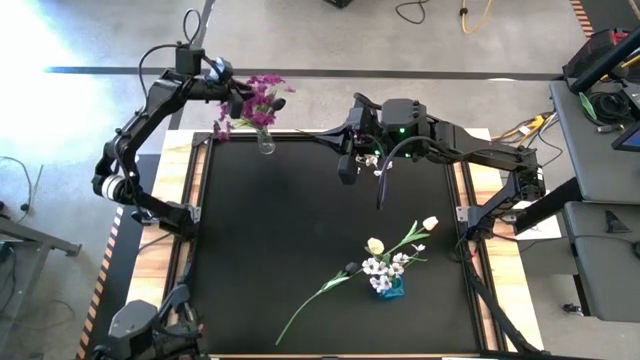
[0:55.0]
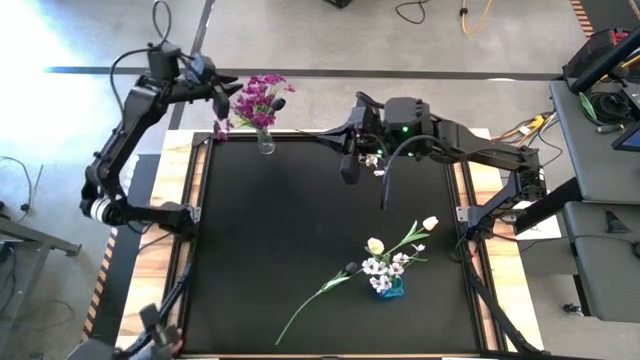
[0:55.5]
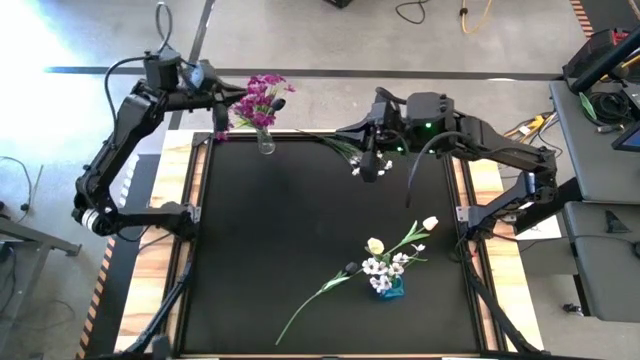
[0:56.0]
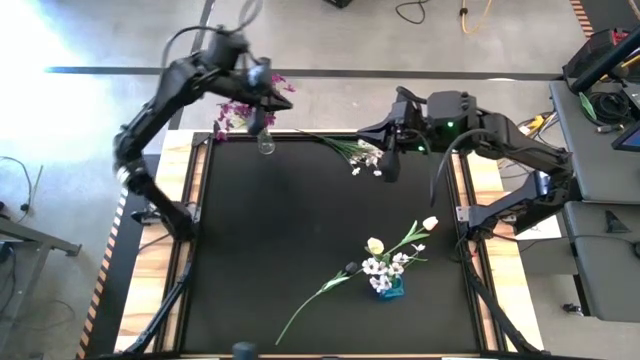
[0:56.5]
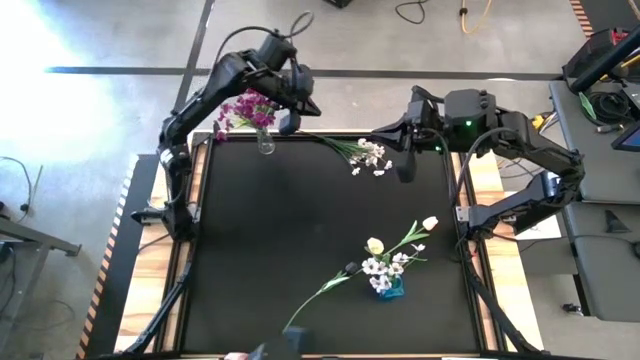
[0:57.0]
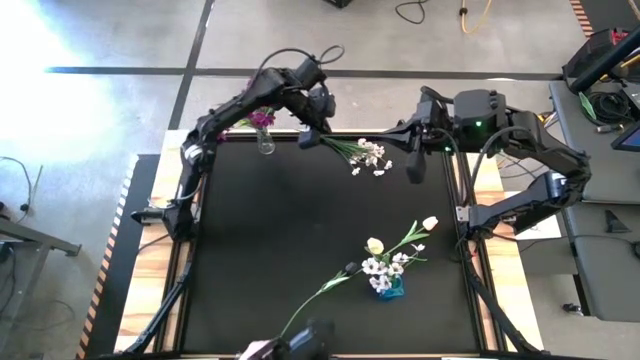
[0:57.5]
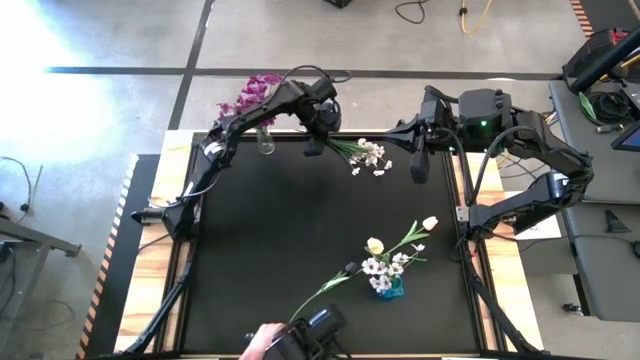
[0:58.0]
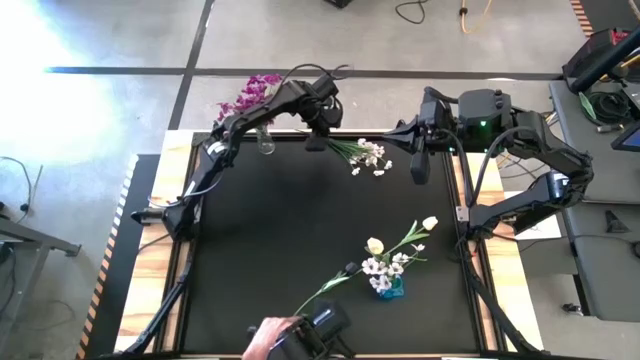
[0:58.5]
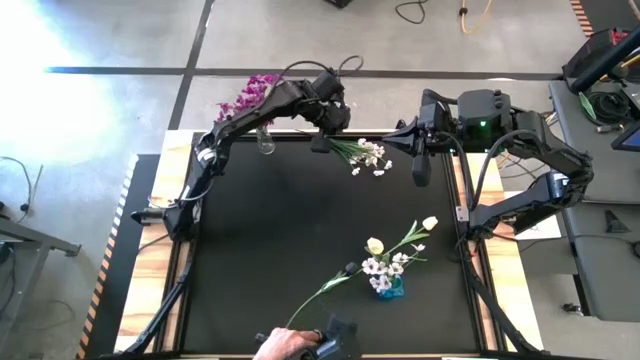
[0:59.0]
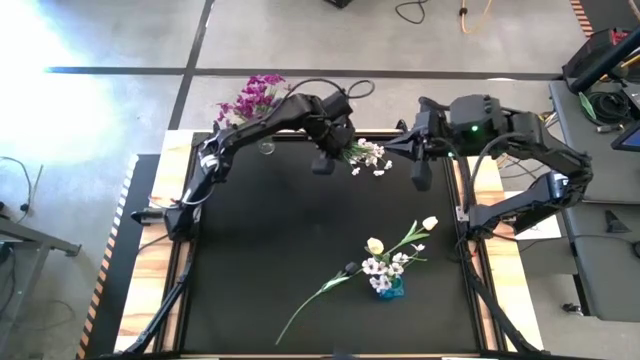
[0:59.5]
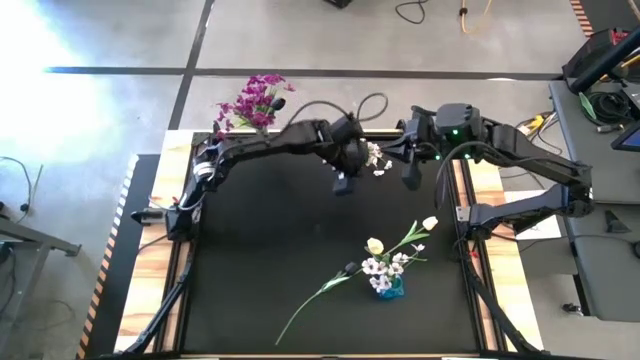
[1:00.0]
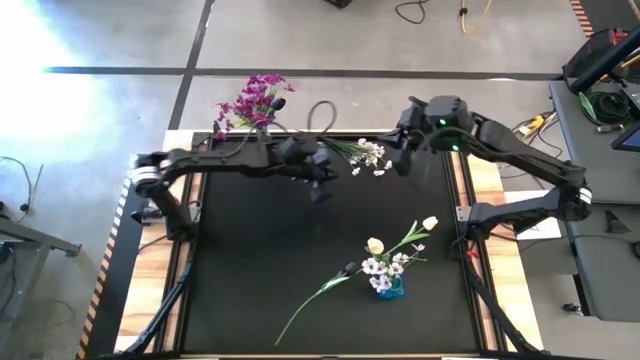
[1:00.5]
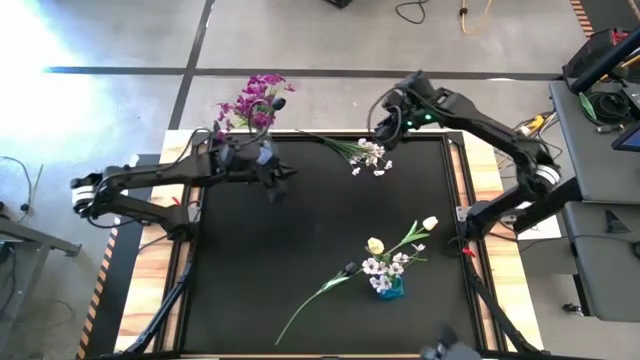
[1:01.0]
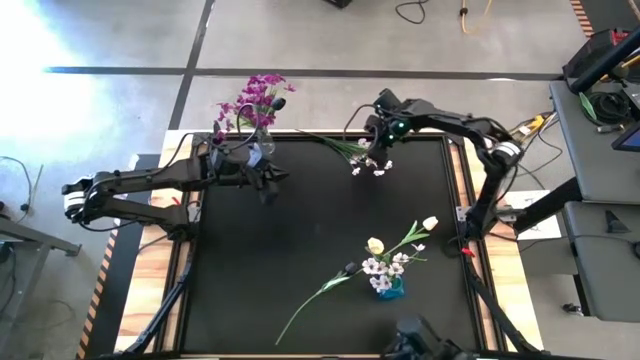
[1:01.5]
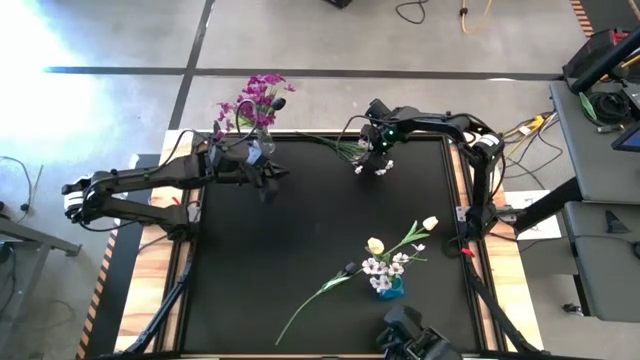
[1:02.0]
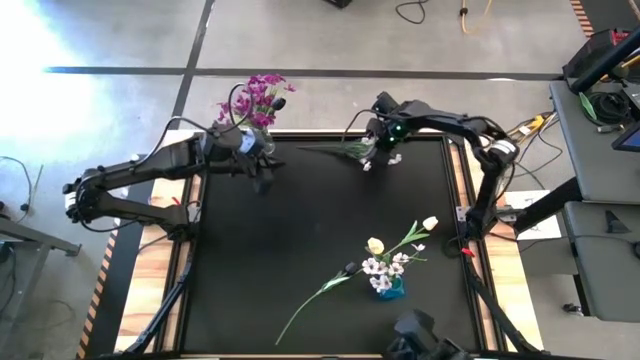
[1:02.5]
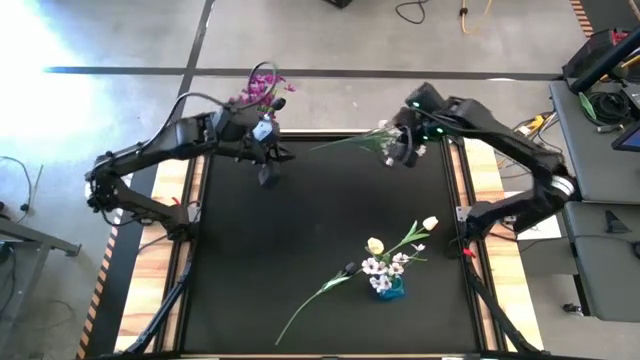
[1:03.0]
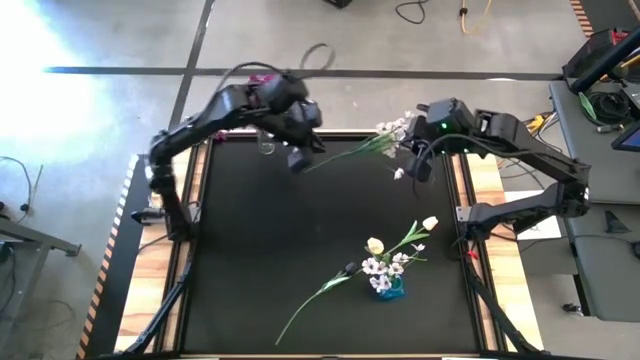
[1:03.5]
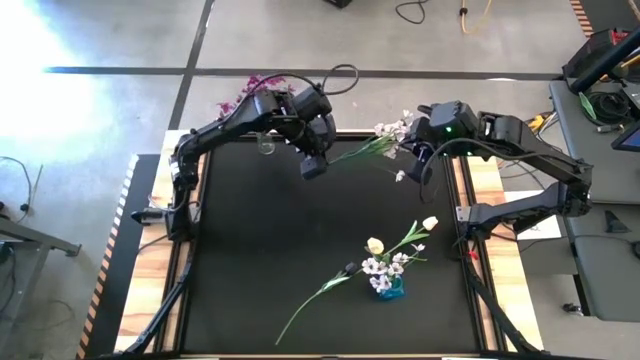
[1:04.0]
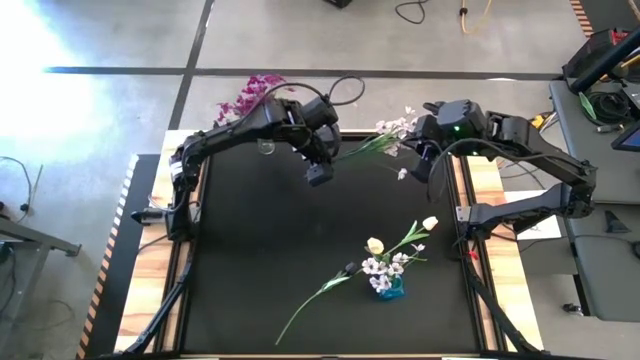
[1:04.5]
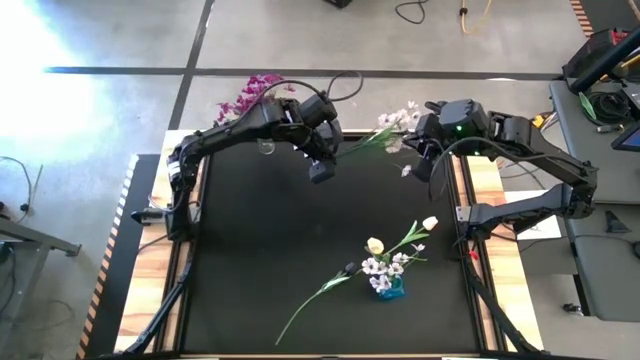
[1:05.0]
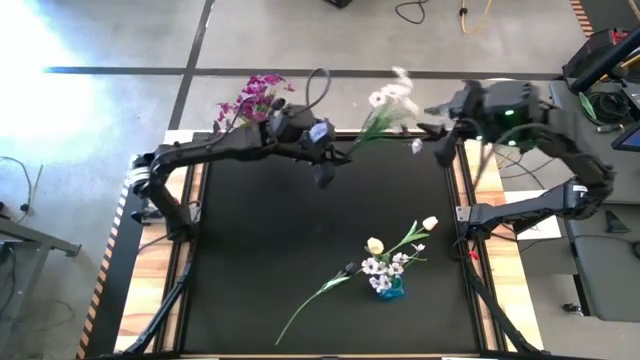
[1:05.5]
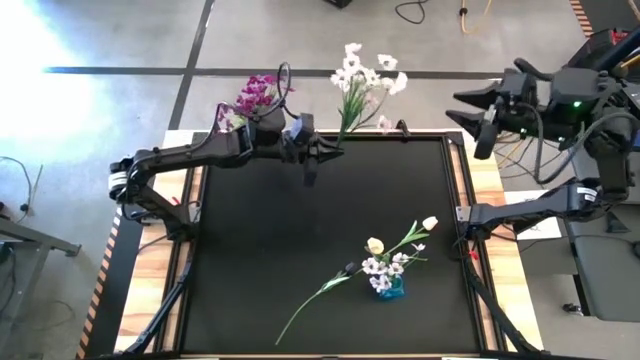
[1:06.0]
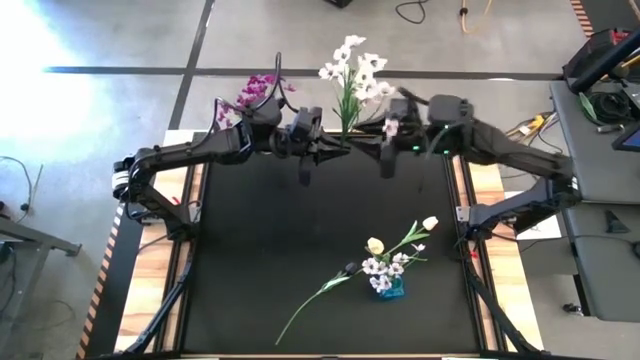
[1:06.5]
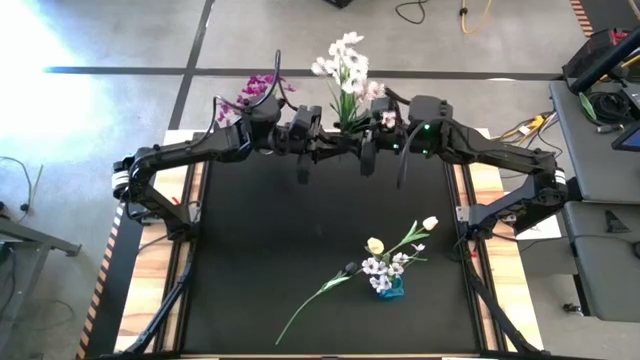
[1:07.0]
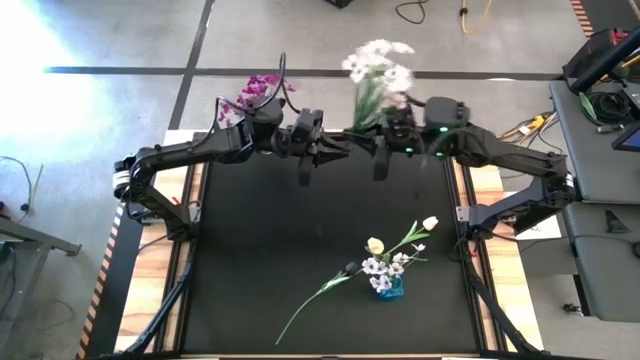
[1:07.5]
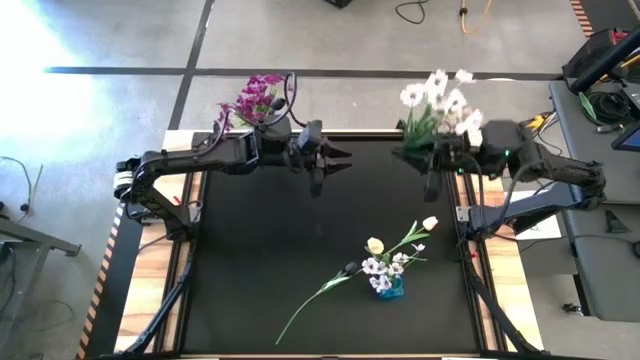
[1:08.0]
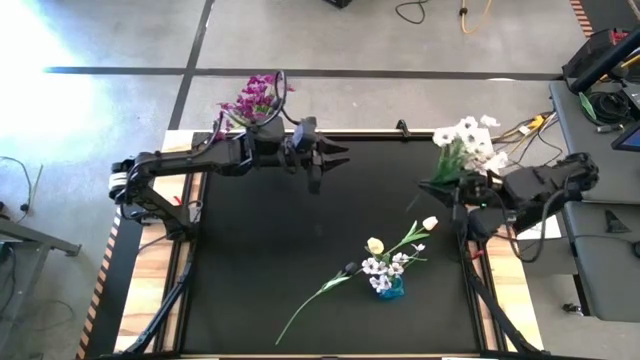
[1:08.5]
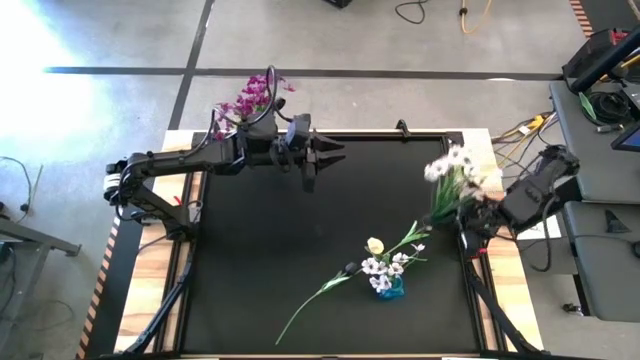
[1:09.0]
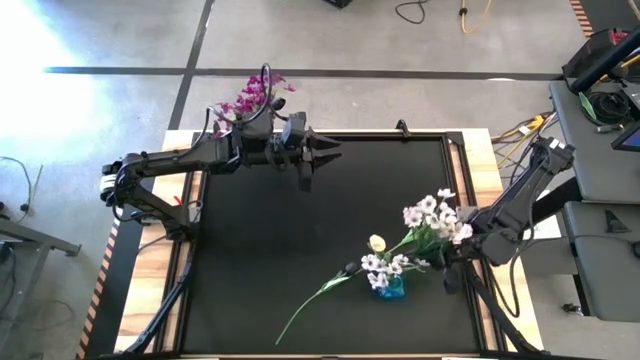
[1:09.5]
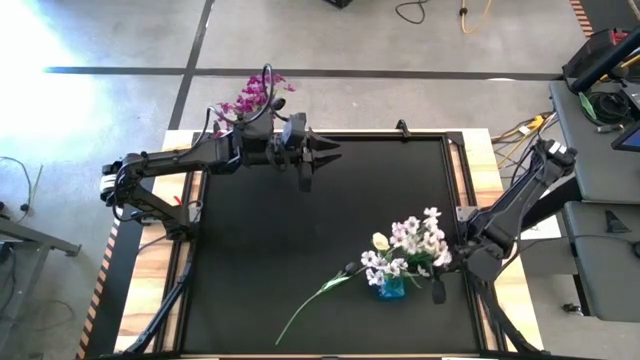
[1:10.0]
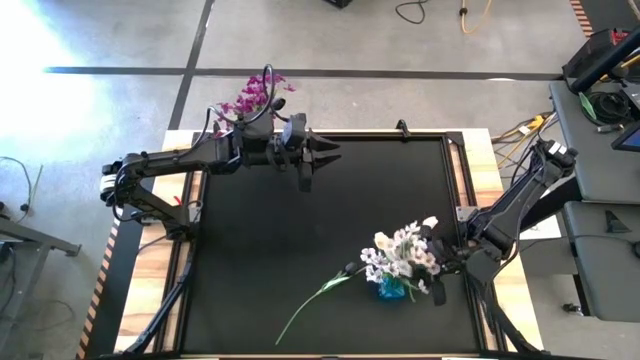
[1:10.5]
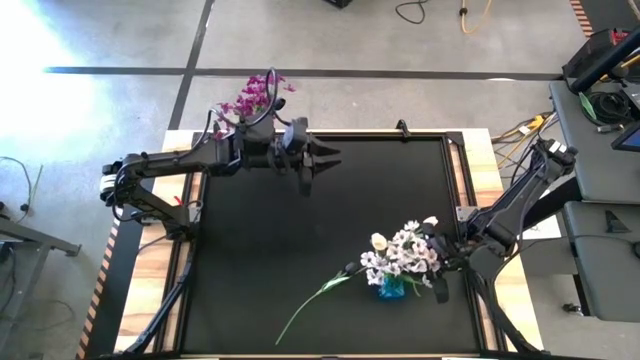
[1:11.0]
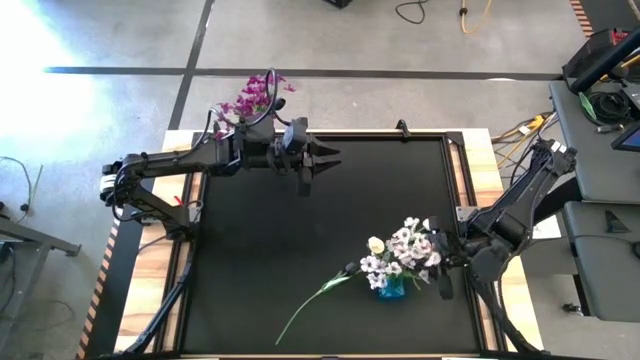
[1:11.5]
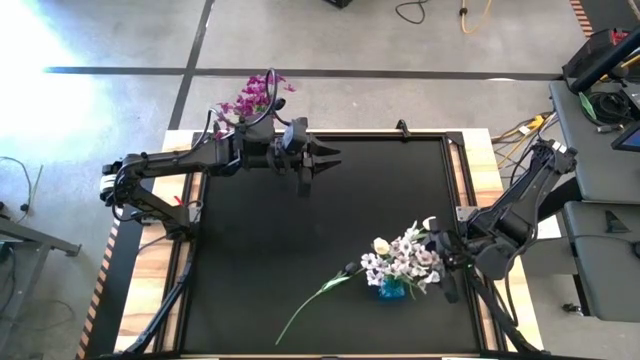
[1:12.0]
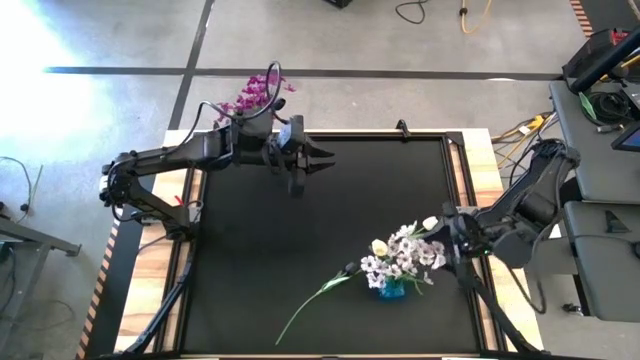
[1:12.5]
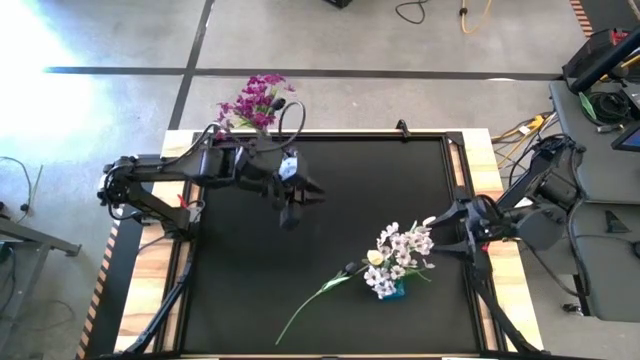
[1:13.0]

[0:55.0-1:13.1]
Task: Sort flowers into vase by color
Put the white flowers into the blue vase

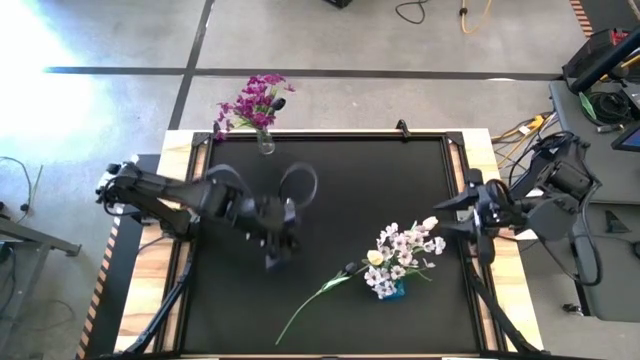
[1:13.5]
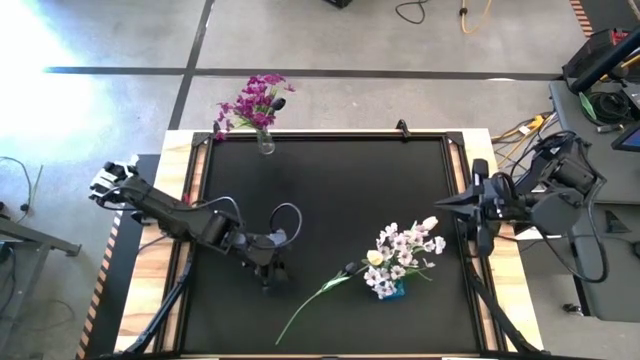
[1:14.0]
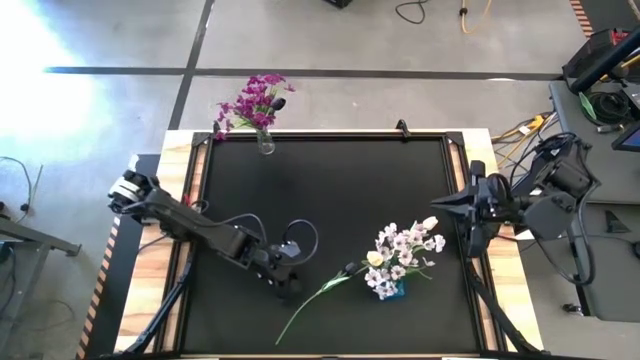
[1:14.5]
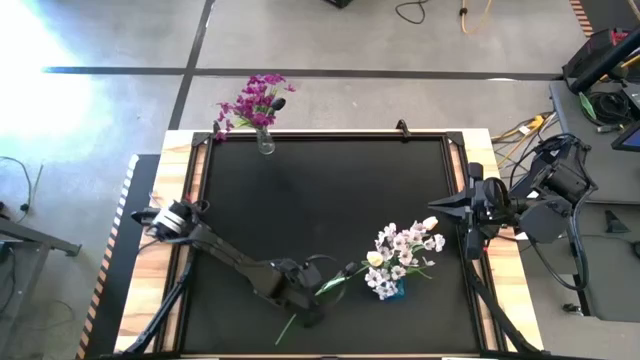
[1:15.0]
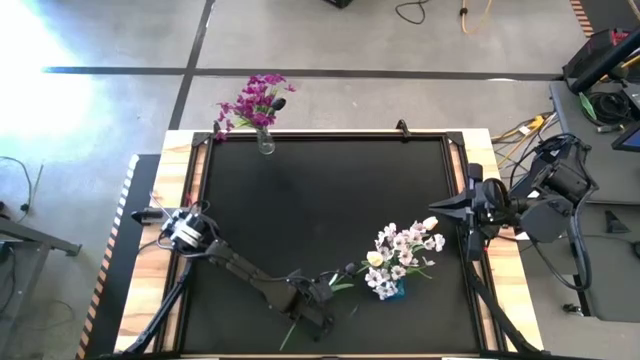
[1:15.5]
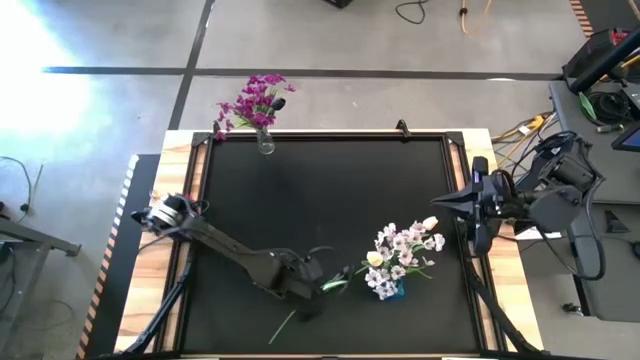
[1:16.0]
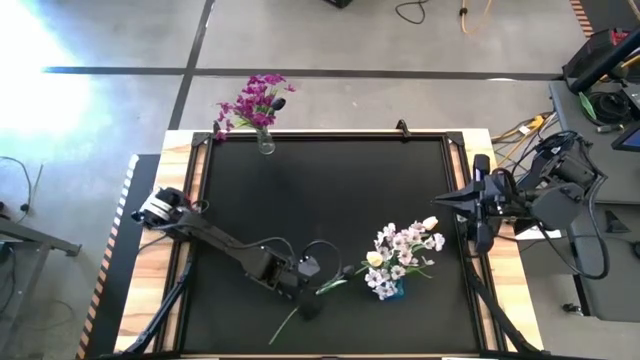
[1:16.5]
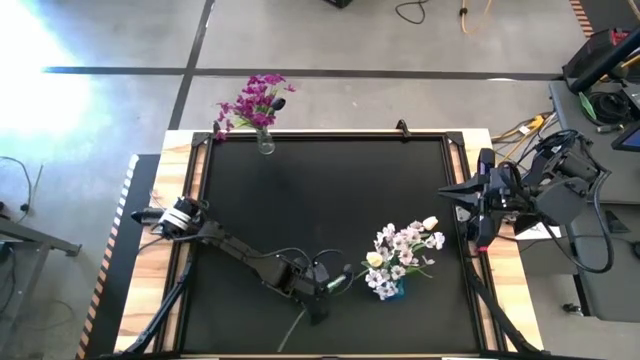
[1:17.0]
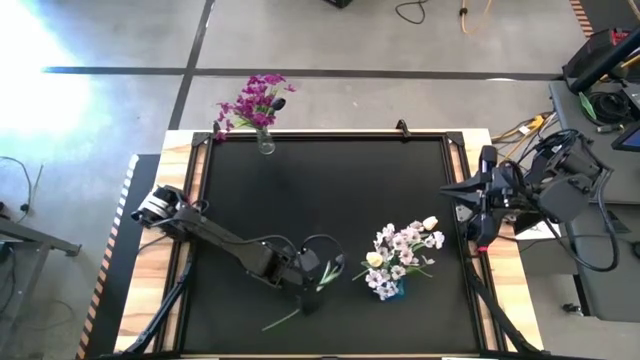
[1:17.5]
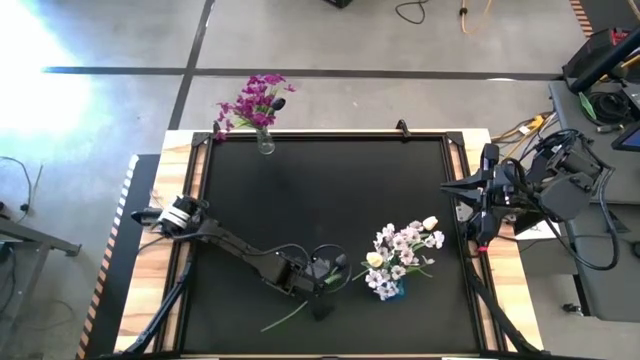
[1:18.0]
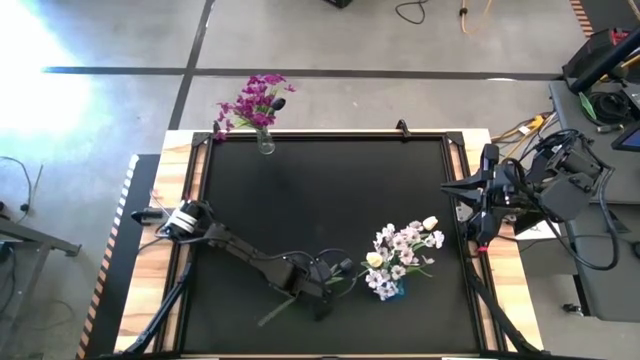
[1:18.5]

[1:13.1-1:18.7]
Put the black tulip into the transparent vase
